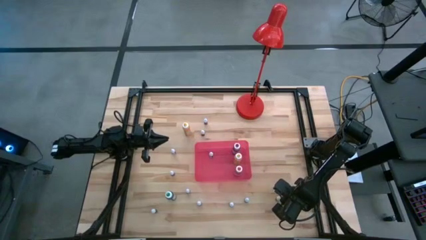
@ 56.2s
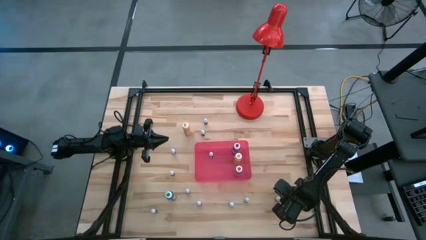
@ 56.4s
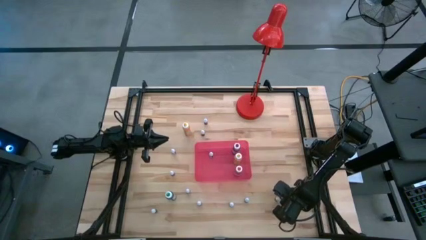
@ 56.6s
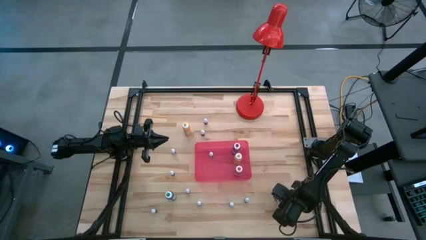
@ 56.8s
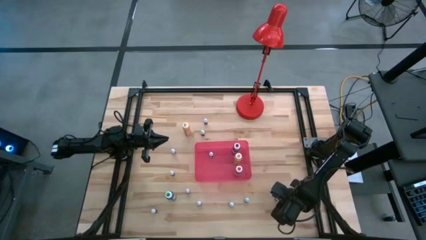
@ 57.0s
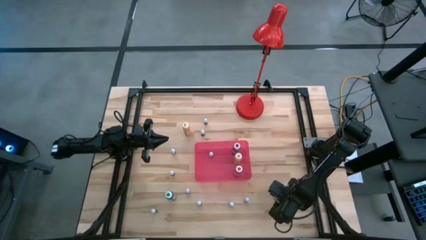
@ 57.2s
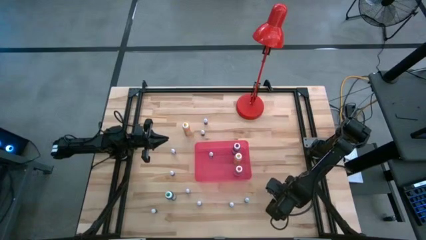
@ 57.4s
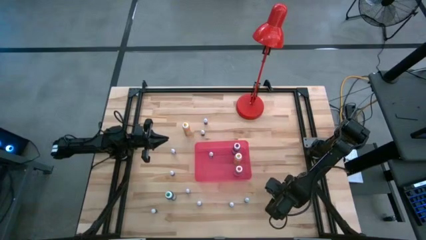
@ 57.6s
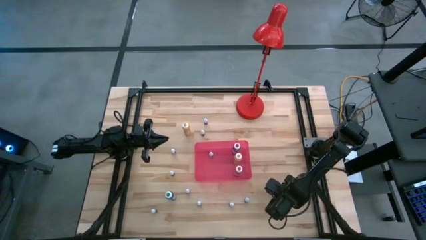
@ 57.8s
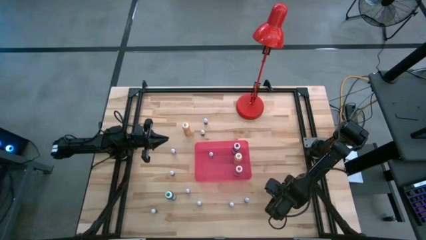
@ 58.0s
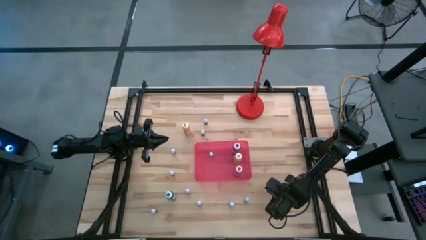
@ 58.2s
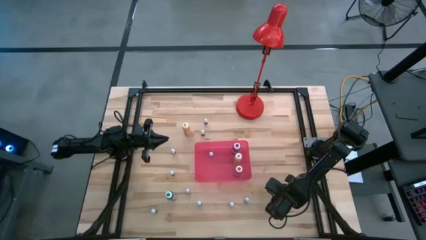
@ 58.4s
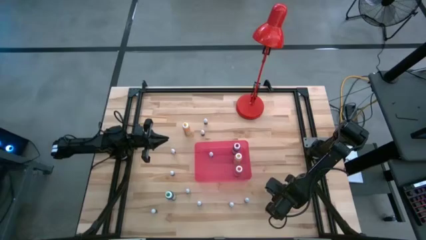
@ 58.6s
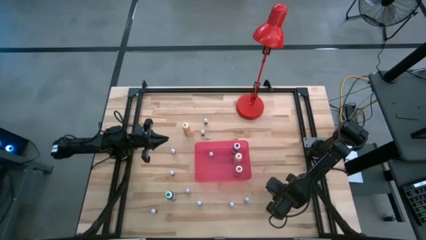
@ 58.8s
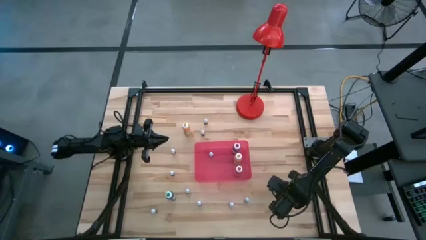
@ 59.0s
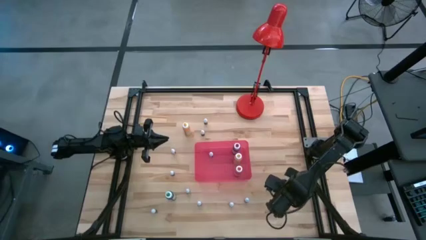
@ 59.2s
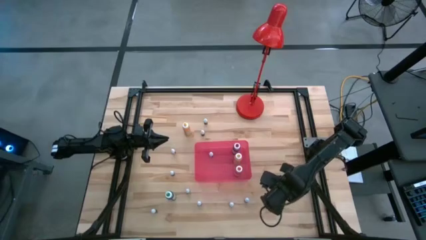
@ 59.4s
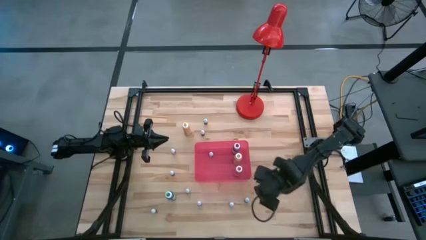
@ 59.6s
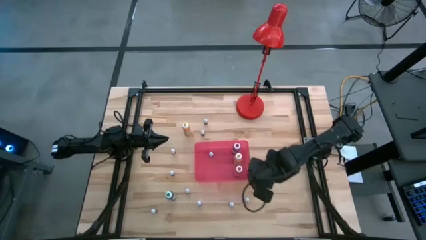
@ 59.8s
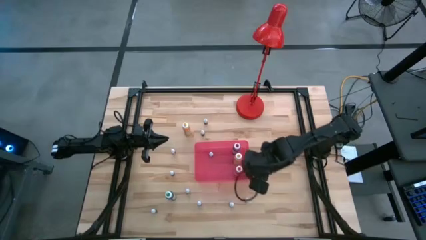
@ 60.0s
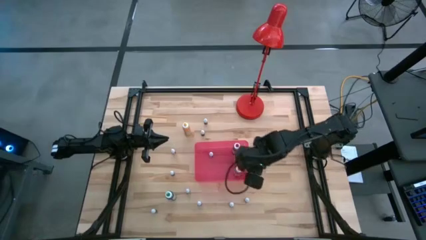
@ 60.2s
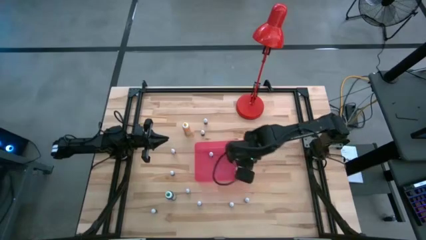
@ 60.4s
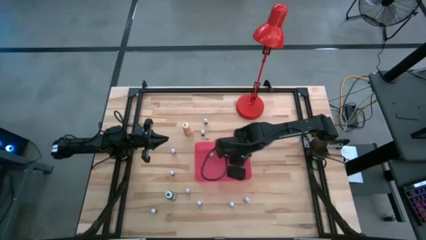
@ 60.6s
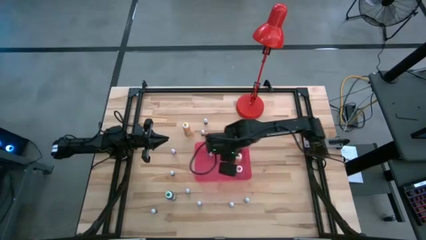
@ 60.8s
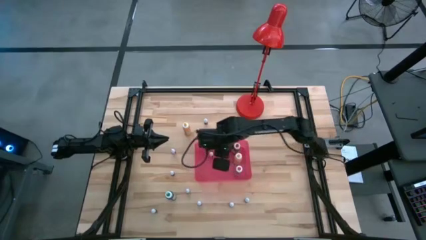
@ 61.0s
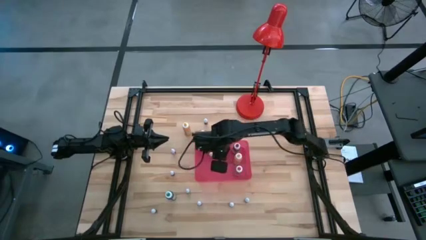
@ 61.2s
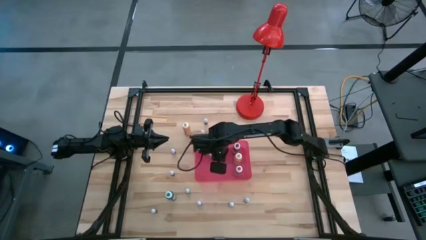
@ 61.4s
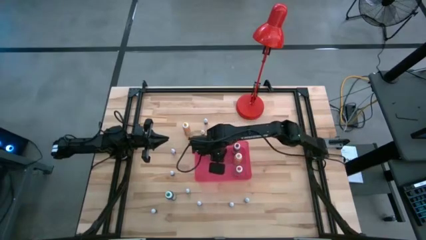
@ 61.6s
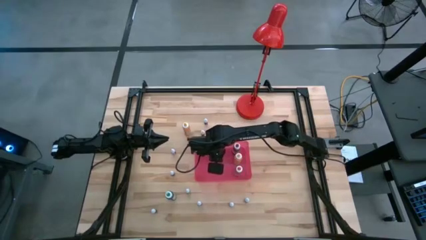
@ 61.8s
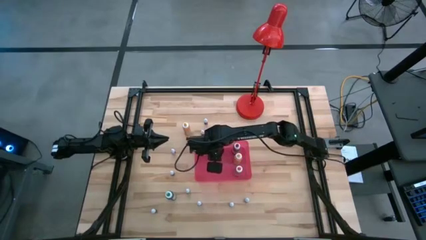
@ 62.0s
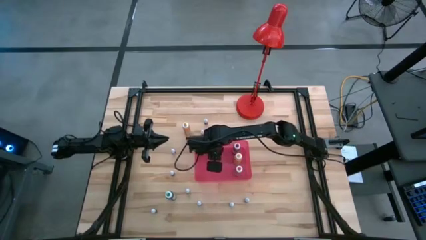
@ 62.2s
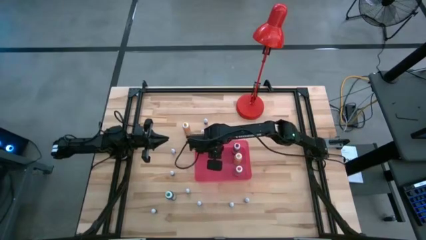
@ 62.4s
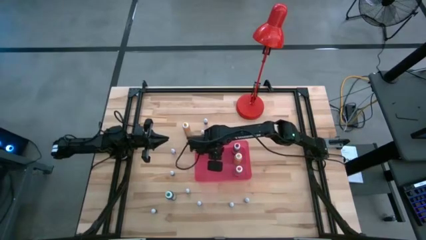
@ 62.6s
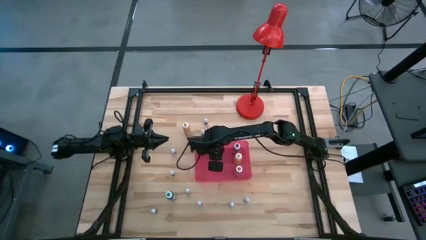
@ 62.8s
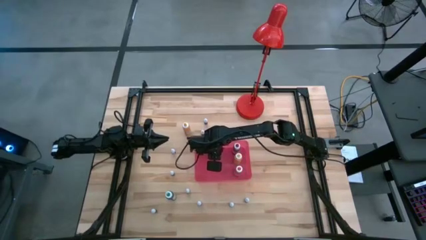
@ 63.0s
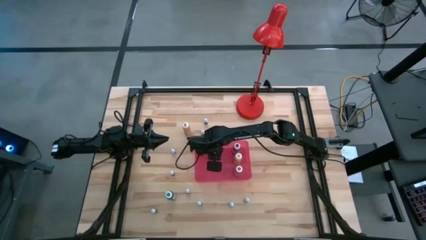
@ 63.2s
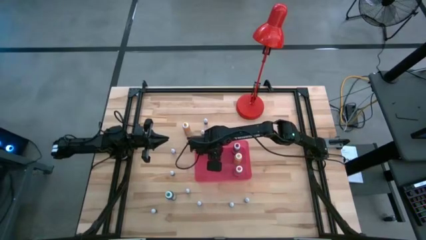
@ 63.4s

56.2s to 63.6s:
Task: Pick & Place food coloring
Put the small red food coloring bottle into the red bin

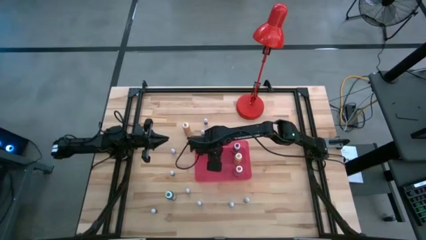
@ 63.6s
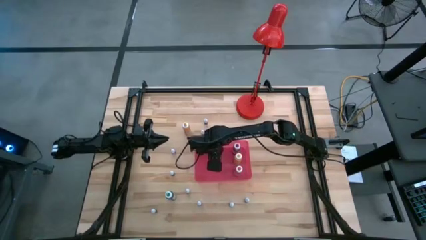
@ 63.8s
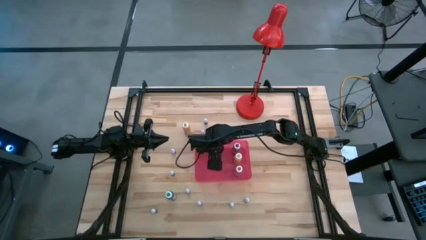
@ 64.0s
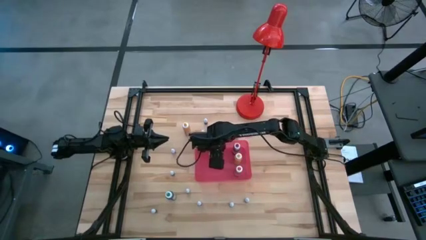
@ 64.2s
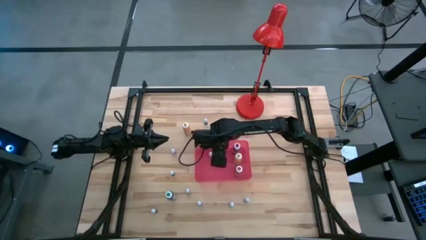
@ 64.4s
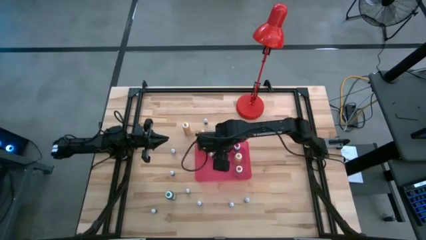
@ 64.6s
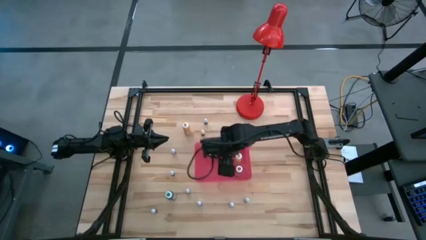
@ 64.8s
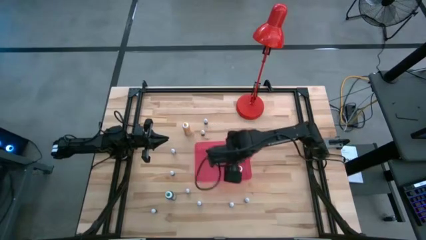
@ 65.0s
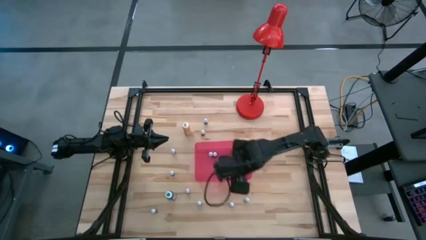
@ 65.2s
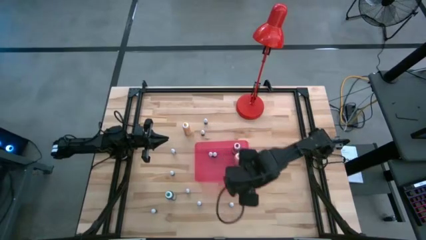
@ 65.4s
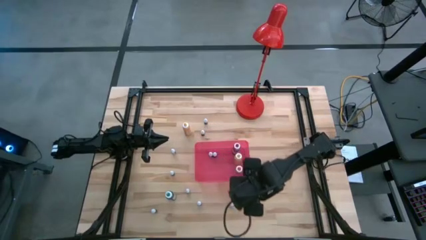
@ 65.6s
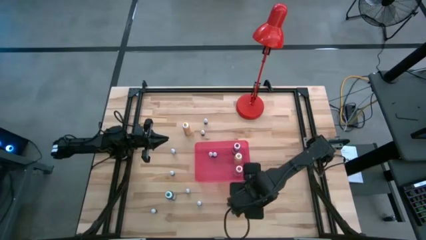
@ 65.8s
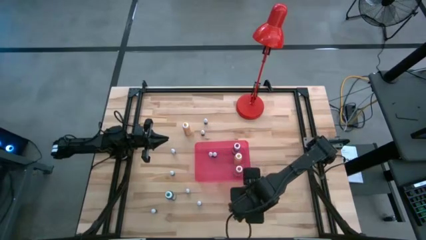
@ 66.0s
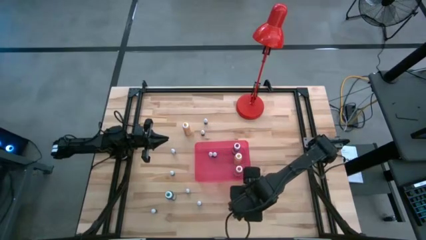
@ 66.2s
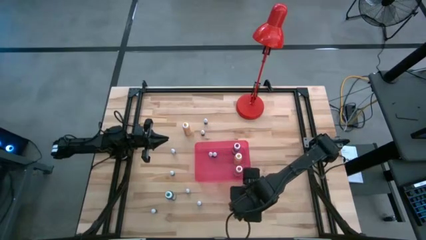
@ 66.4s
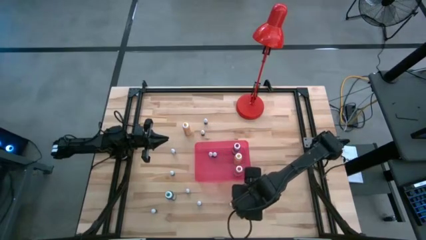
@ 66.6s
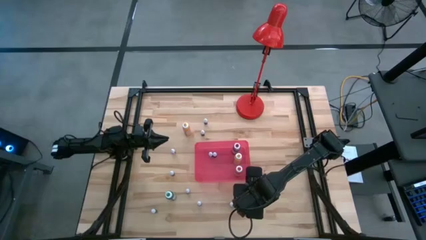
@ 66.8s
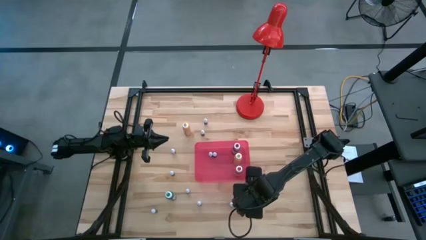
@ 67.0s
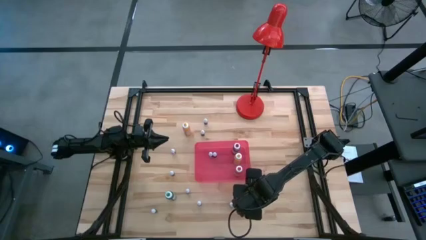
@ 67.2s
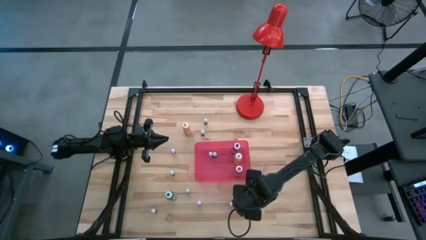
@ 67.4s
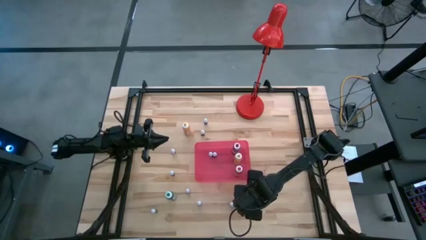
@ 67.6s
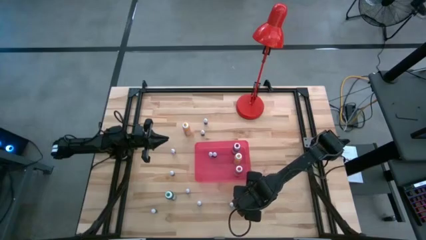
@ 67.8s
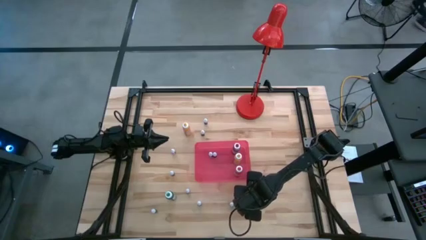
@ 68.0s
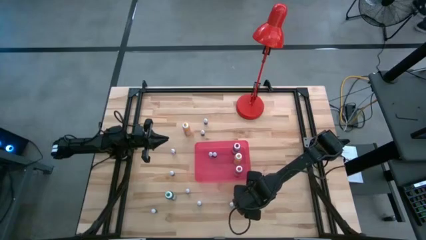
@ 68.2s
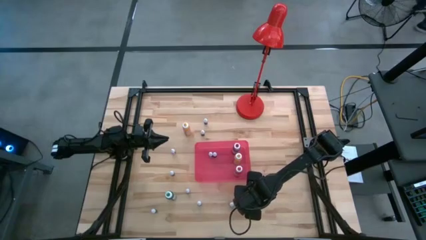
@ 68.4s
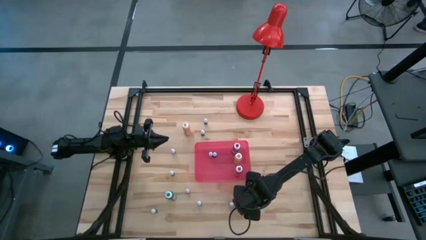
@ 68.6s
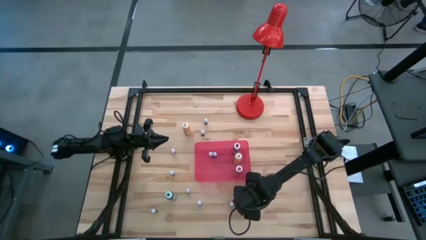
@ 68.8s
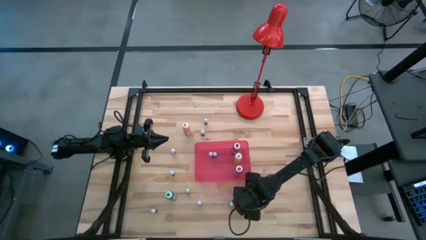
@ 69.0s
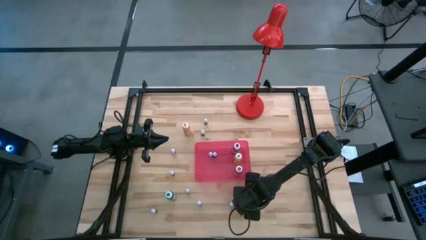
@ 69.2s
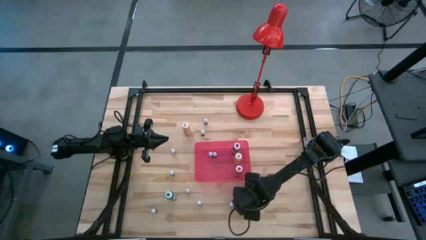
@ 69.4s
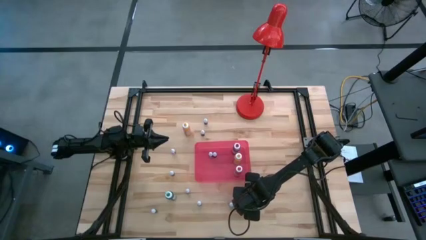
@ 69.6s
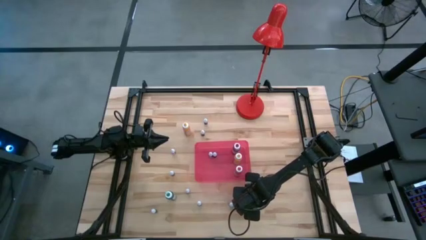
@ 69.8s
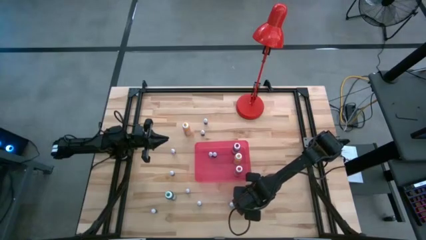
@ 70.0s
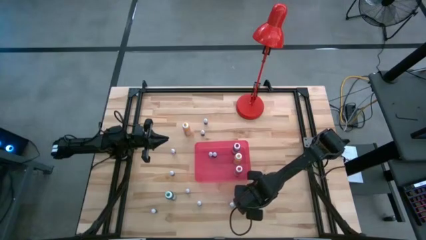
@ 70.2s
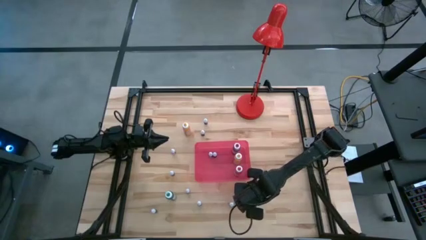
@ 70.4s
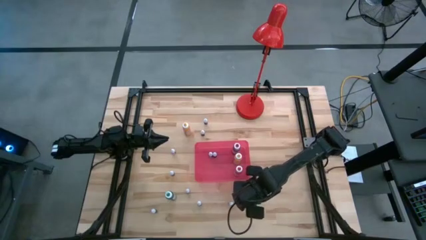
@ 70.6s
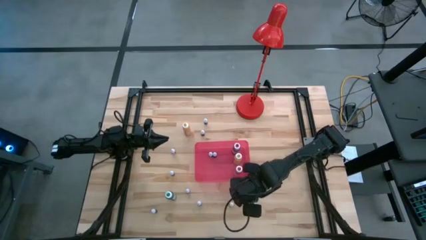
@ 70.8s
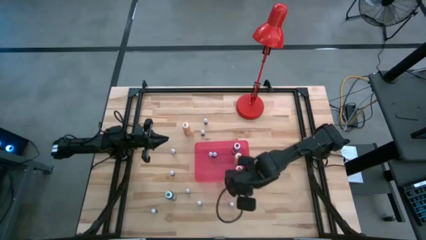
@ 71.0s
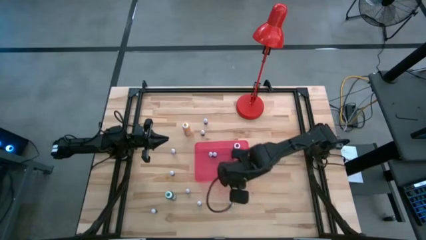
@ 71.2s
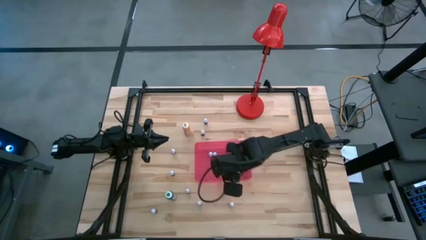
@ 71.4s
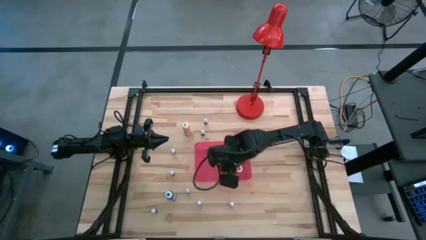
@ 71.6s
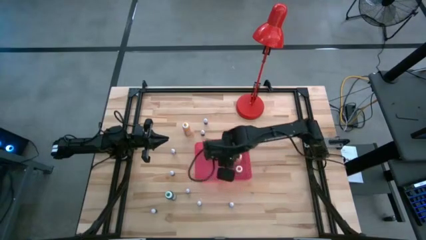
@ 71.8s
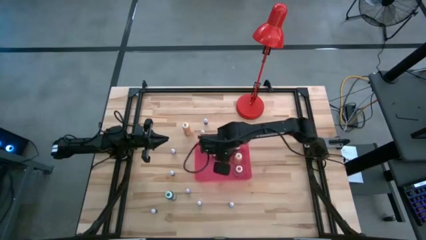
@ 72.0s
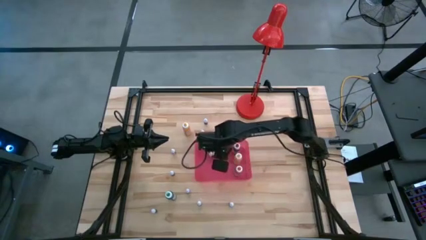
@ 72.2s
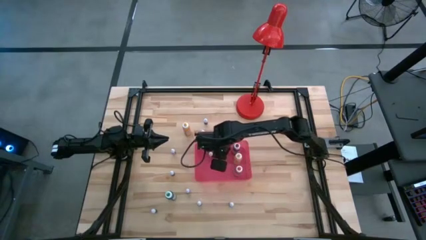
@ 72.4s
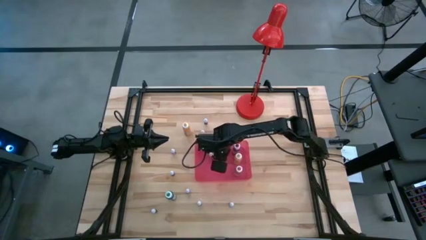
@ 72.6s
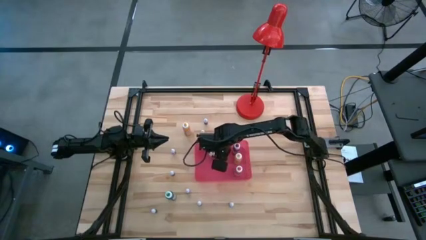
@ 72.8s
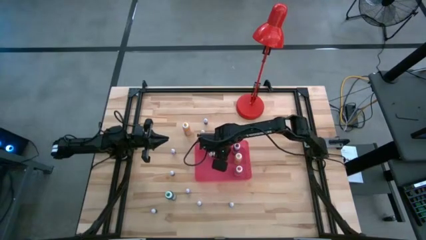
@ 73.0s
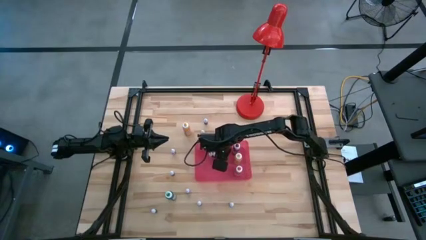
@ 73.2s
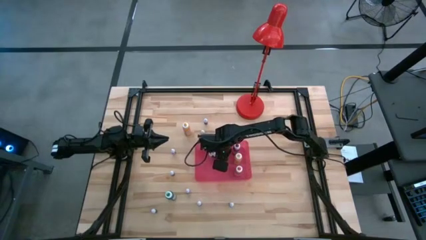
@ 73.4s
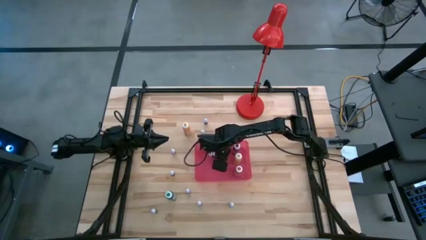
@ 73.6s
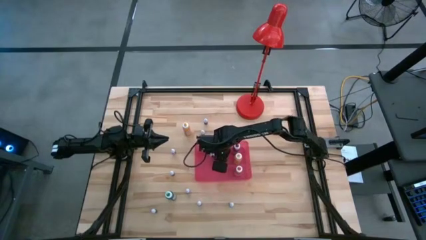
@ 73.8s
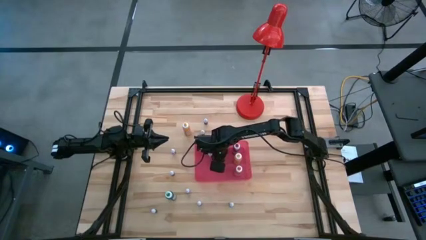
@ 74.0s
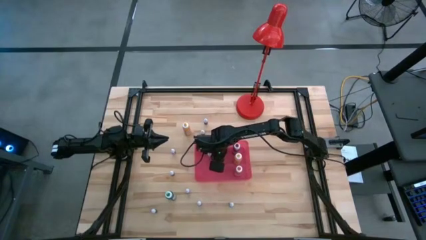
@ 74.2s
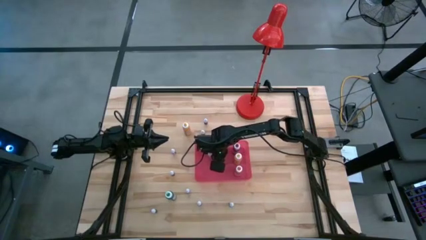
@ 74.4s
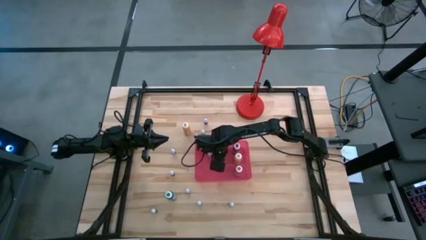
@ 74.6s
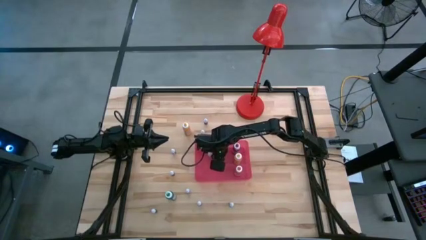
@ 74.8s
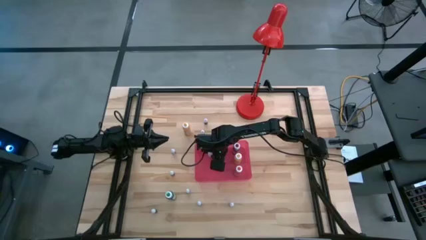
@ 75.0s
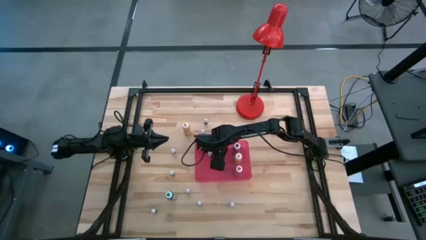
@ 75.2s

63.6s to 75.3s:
Put the small black food coloring bottle into the red bin
